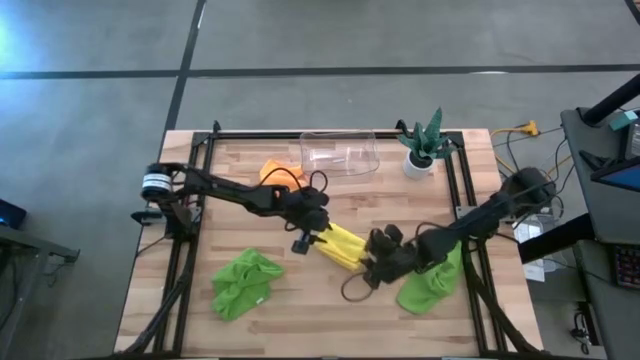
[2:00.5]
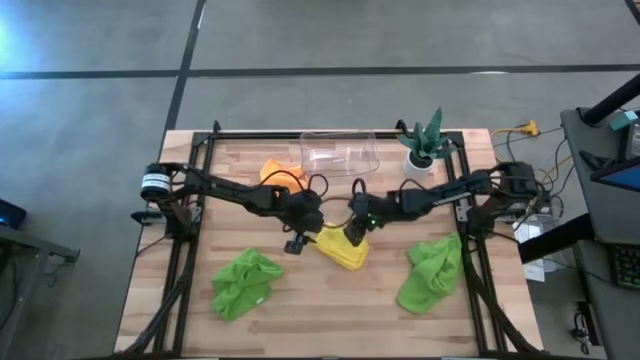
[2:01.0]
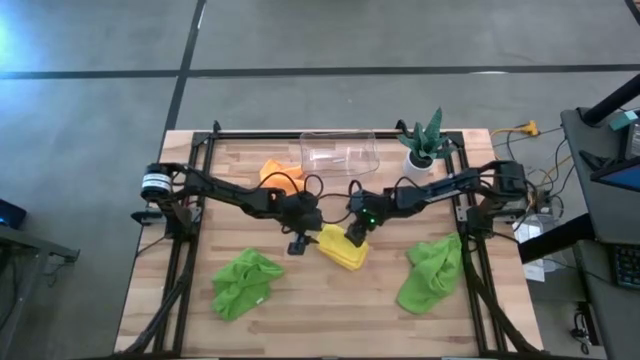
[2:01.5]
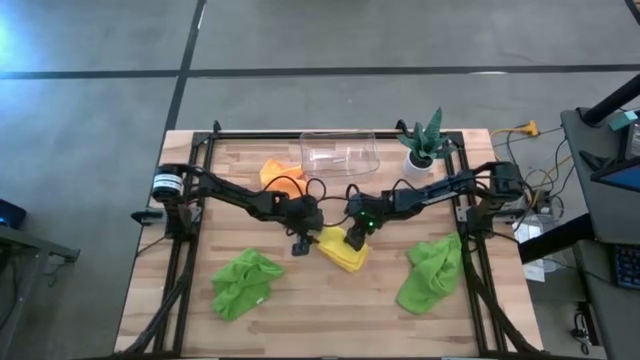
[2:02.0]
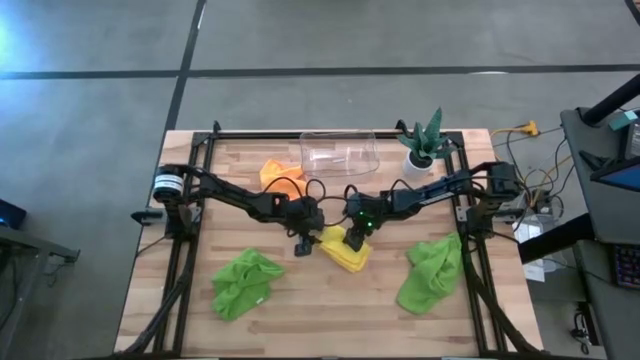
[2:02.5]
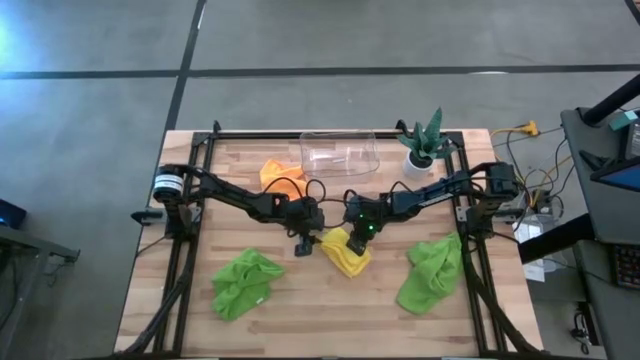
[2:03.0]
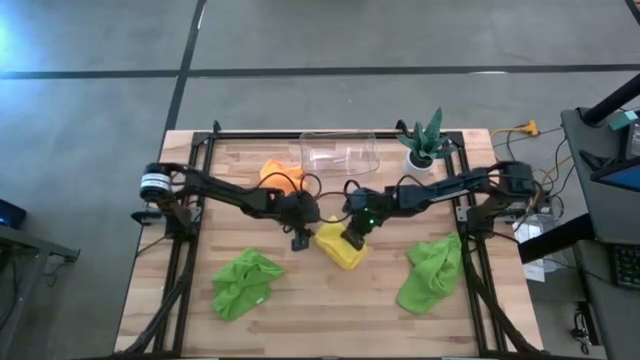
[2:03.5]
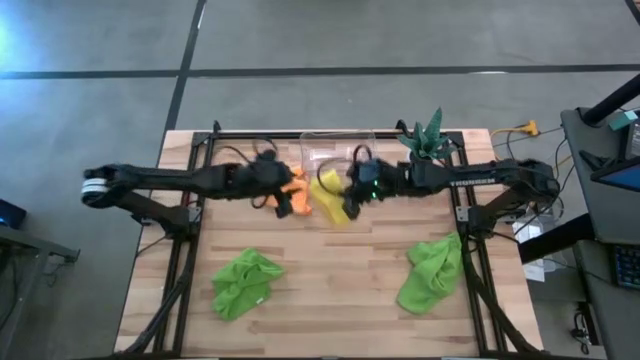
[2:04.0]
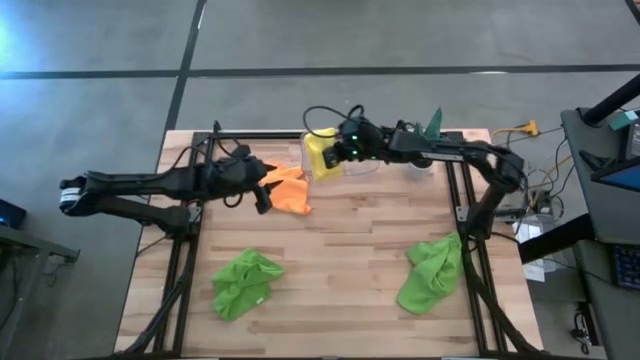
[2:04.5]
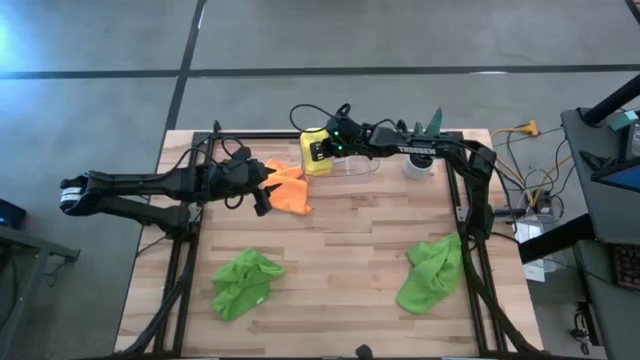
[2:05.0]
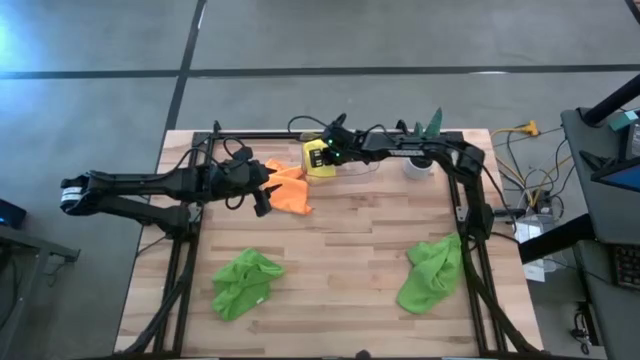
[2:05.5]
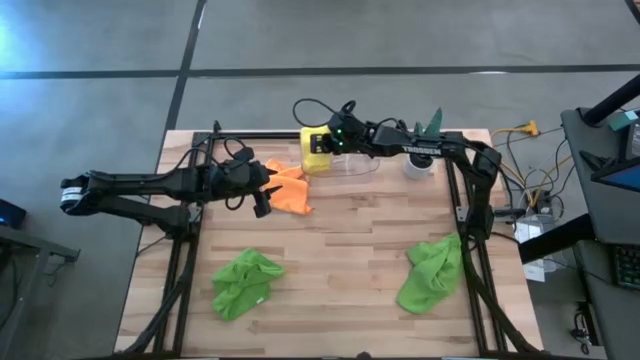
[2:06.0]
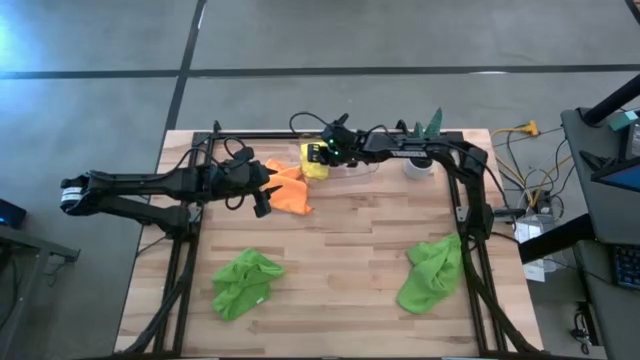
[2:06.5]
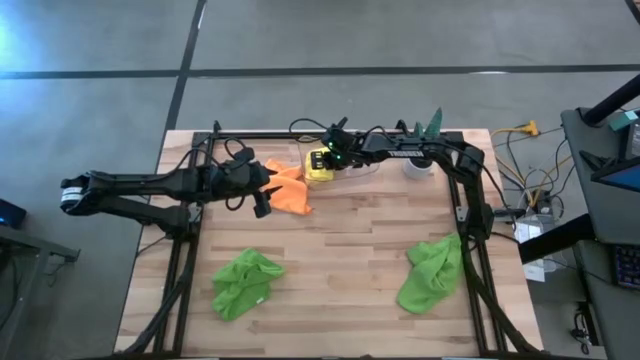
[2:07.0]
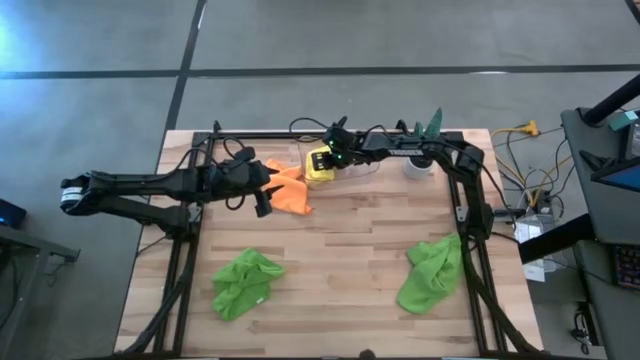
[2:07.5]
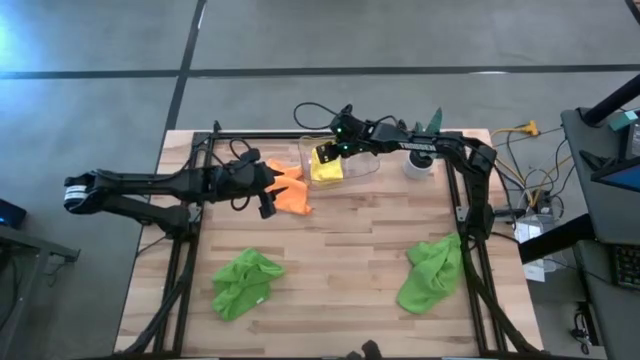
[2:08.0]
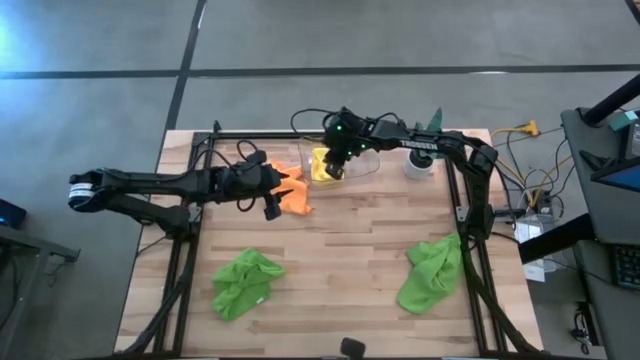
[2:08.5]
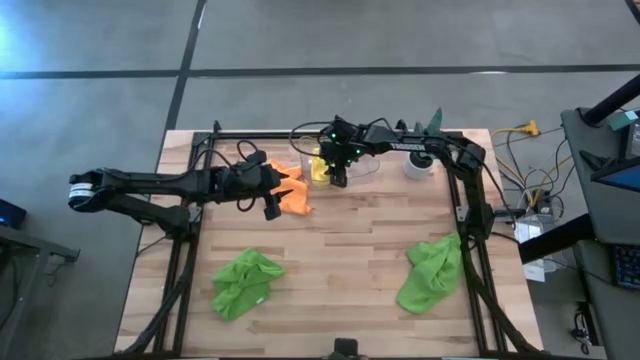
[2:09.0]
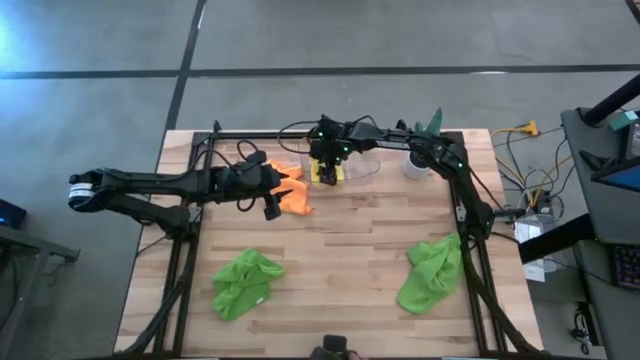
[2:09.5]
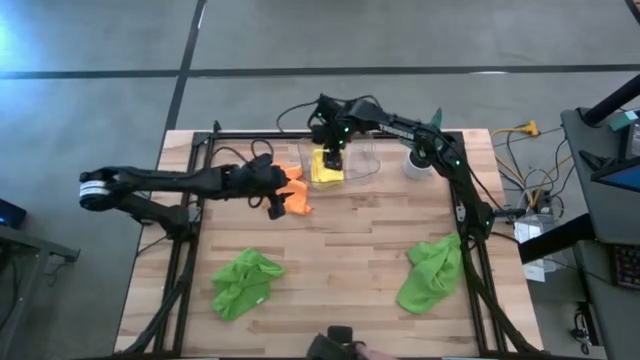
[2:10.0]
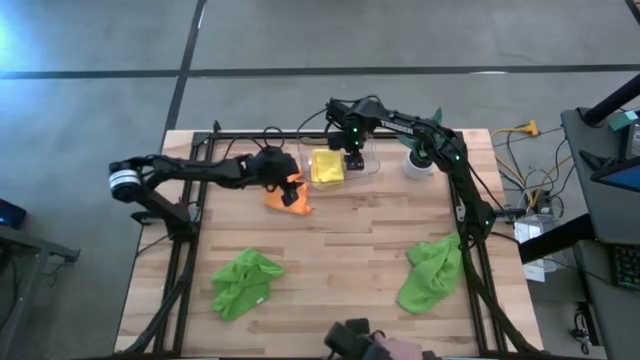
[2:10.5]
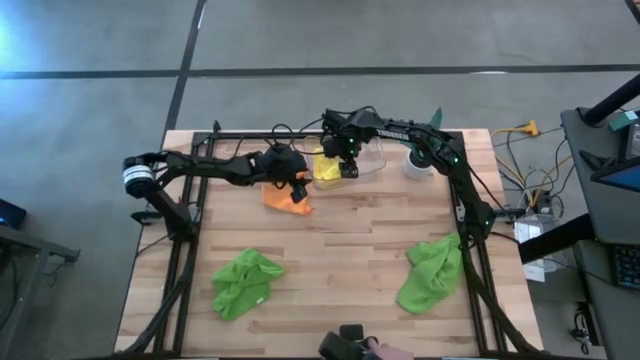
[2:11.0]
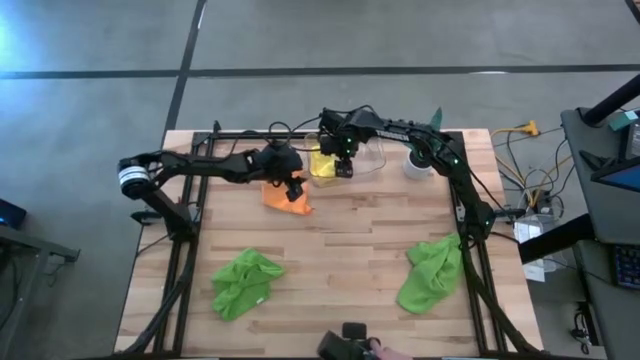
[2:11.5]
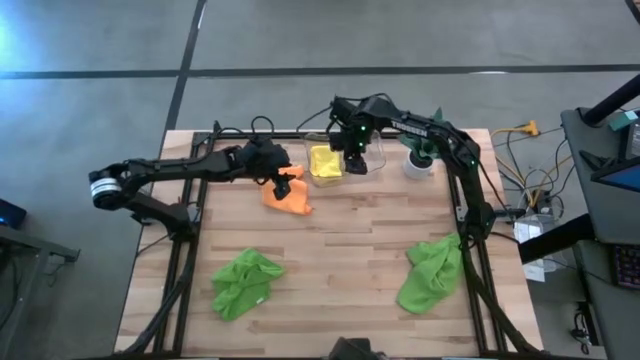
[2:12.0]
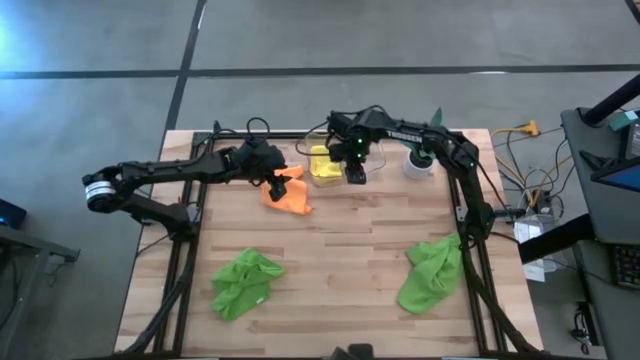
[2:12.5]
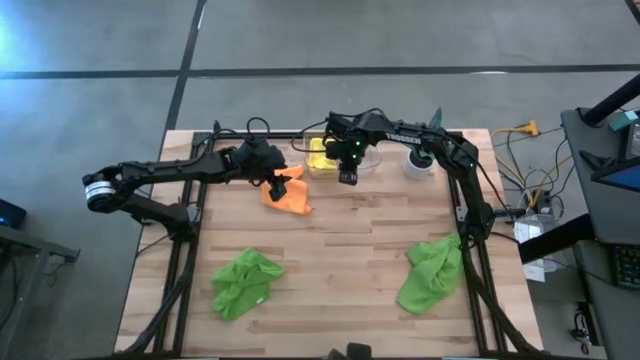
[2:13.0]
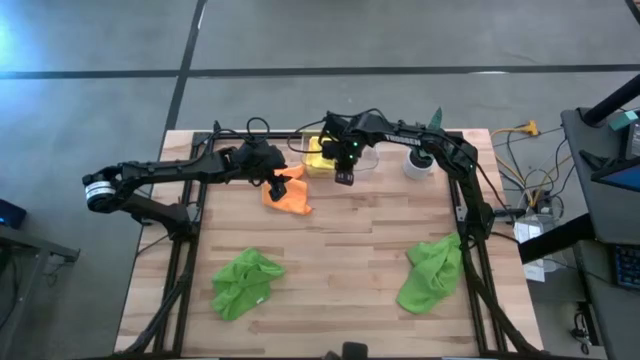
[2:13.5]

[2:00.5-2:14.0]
Task: Fold microfiber towels
Put the folded yellow microfiber towel into the transparent bin

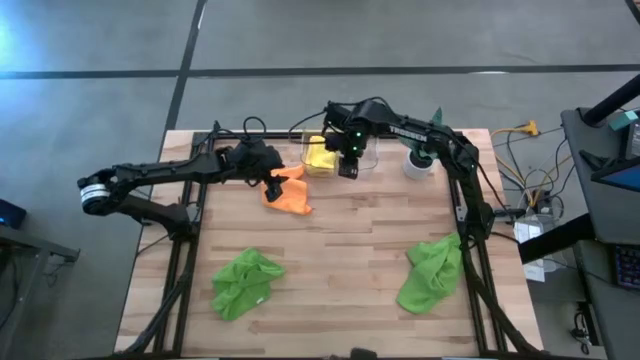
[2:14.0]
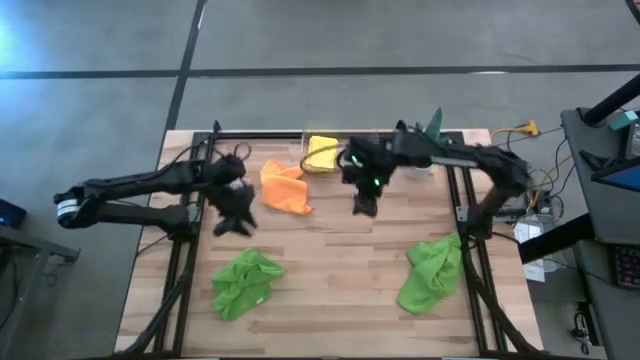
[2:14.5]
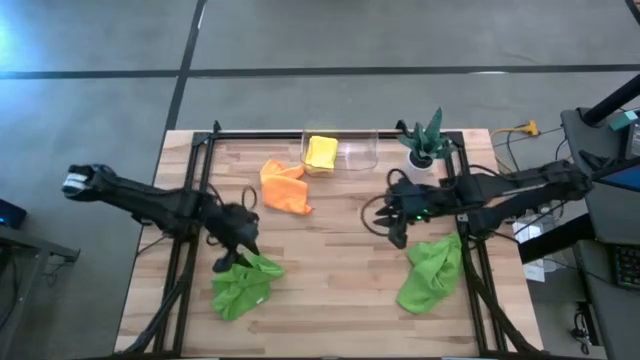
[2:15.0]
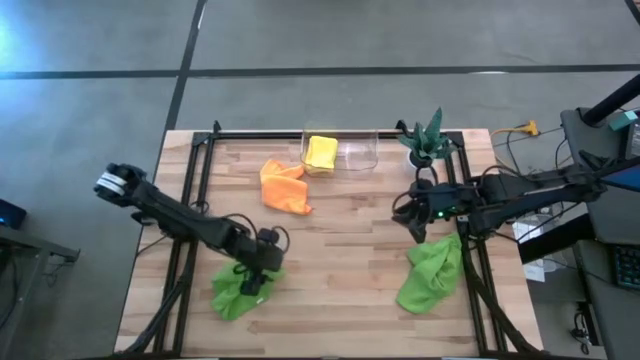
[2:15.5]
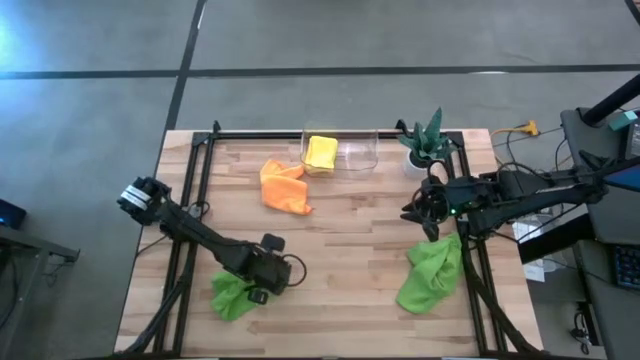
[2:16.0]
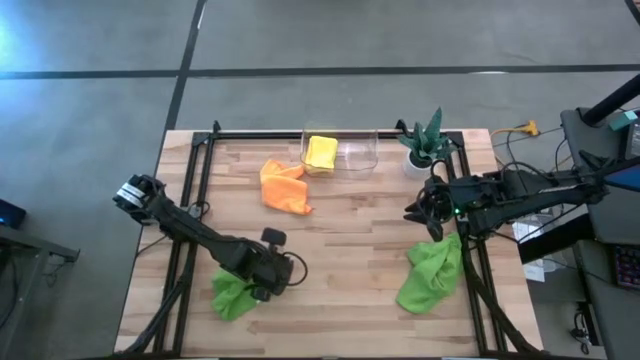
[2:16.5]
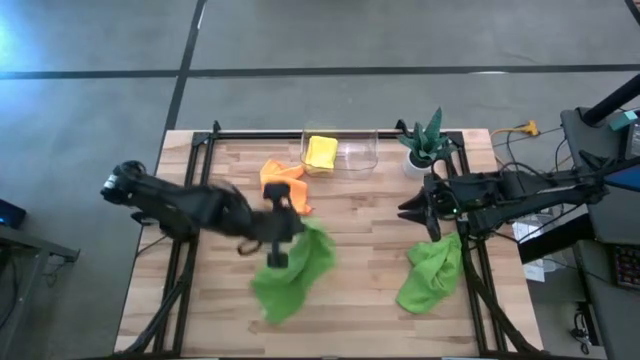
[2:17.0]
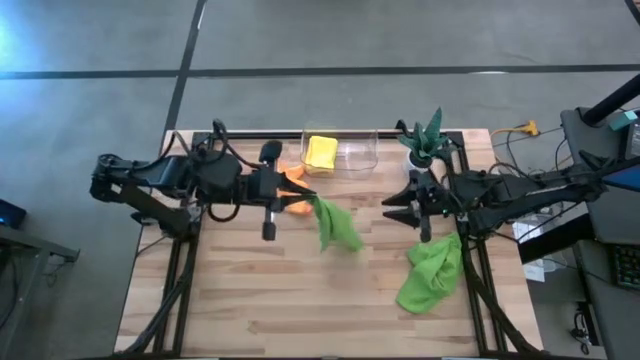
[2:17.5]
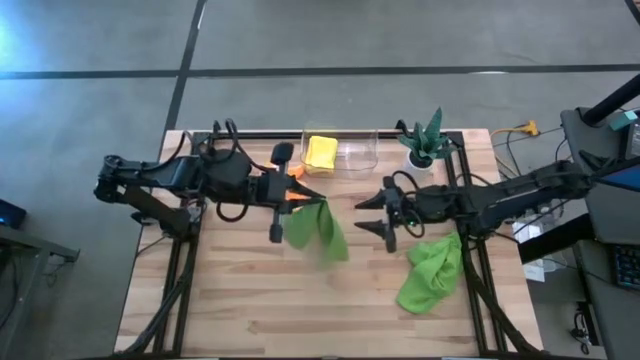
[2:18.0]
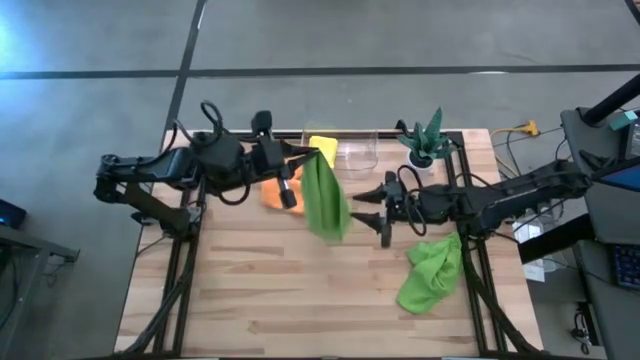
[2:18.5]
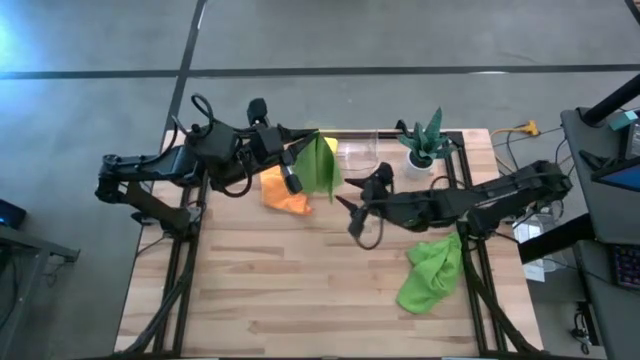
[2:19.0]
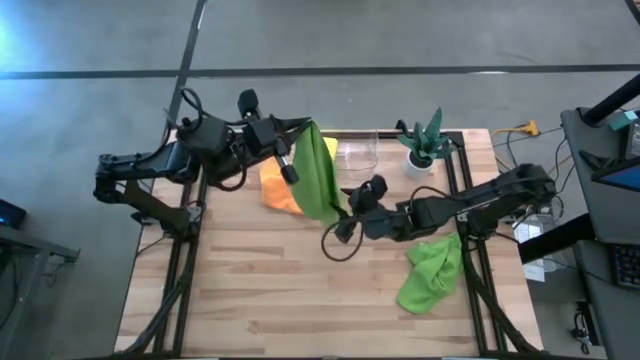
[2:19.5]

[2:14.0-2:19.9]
Fold the left green microfiber towel

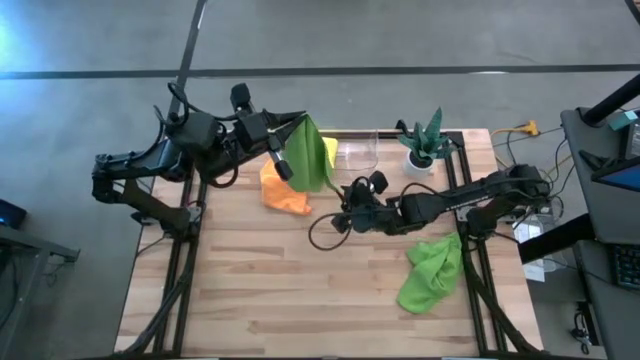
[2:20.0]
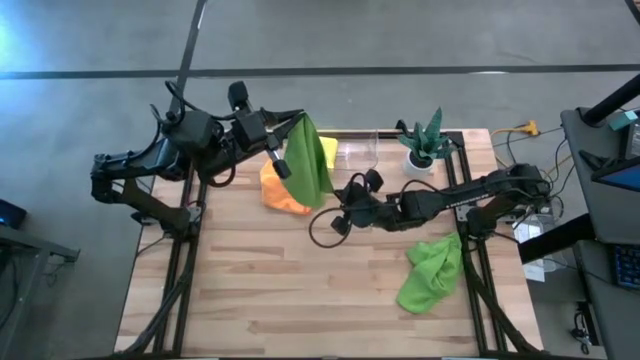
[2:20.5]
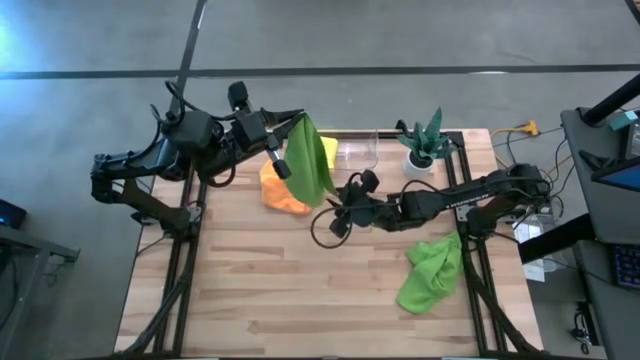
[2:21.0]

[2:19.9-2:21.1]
Fold the left green microfiber towel

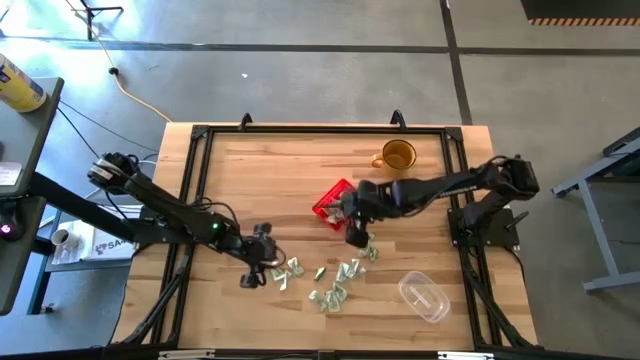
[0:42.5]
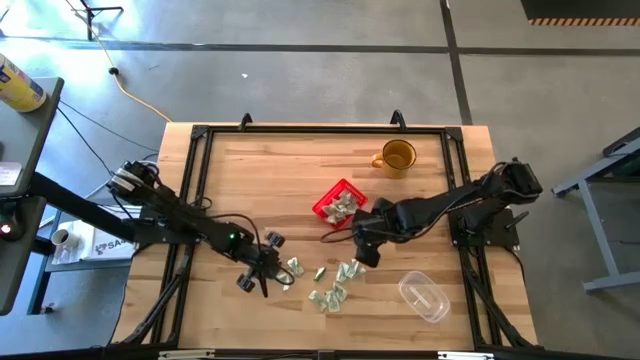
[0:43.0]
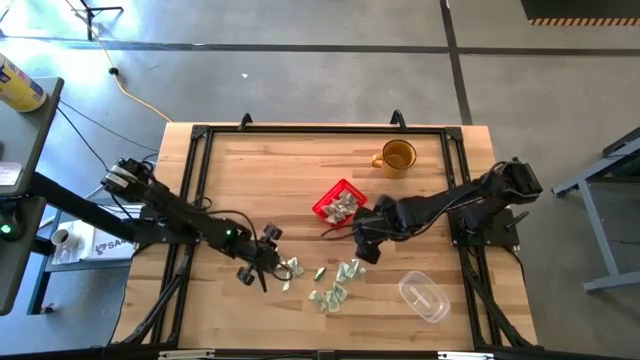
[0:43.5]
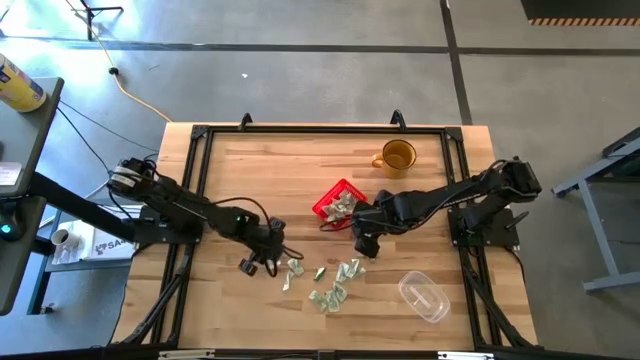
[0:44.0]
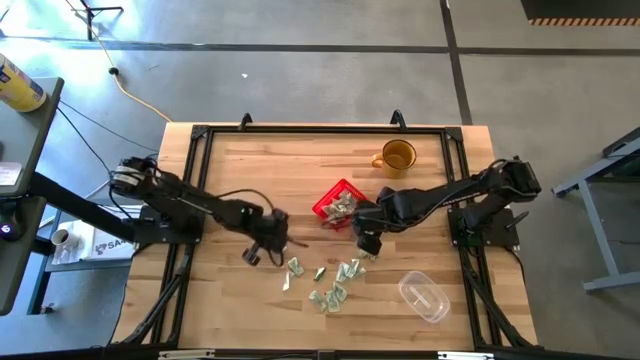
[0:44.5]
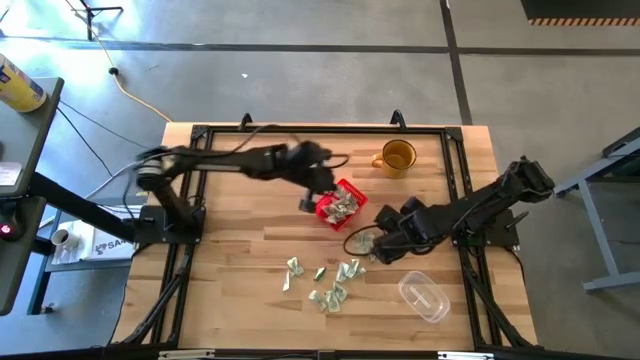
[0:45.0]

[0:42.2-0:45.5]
Task: Pick and place items into bin
Put the white stevia packet into the red bin
